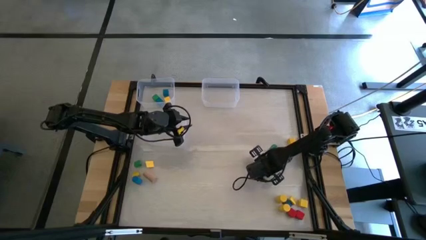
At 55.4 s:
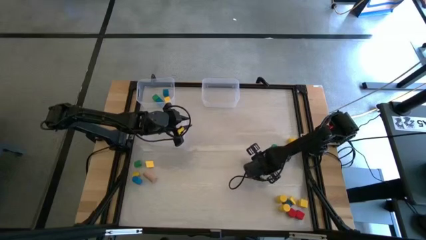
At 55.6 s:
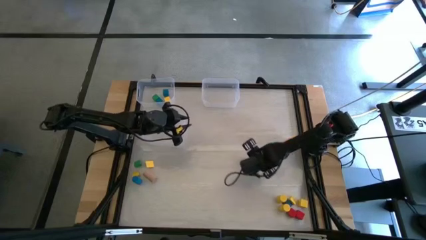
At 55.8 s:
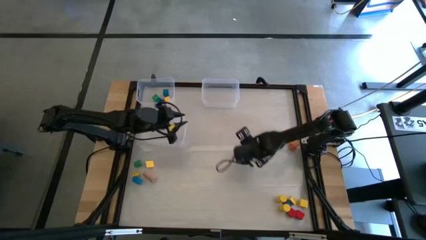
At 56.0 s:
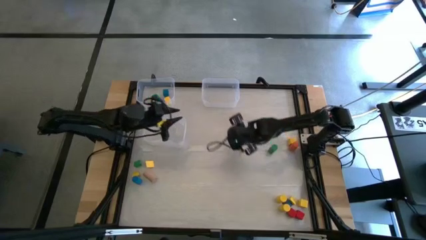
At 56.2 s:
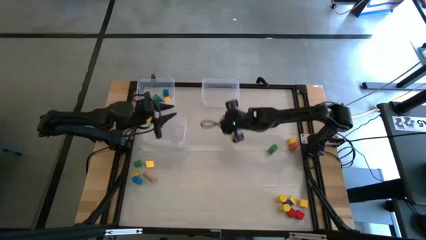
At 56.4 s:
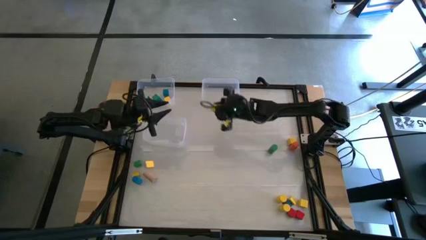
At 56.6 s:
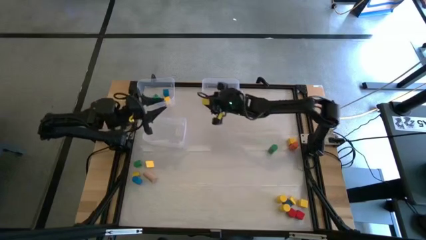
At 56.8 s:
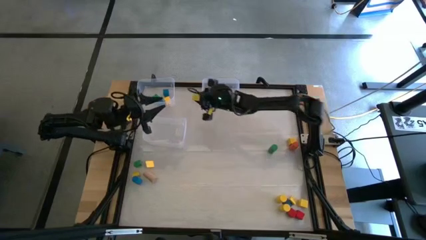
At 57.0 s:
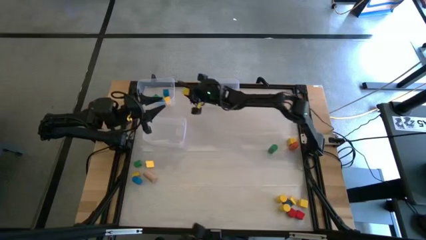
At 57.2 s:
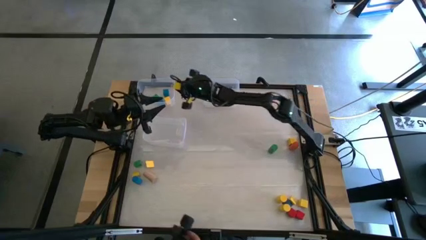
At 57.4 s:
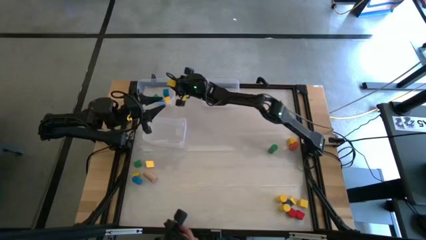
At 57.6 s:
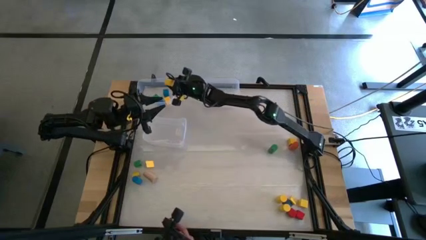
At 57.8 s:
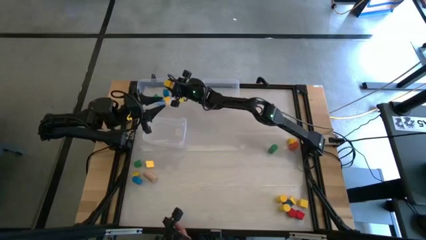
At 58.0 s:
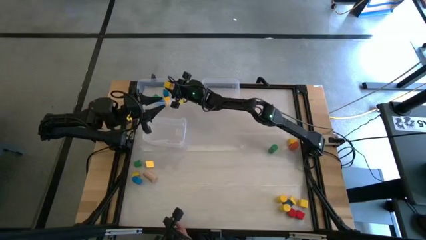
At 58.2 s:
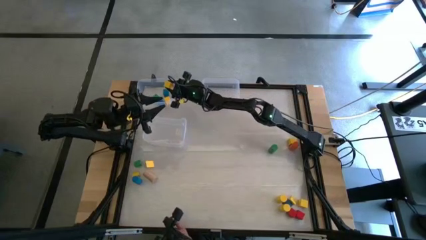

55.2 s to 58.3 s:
Task: Sort blocks by size
Put the yellow square game block into the top left transparent bin

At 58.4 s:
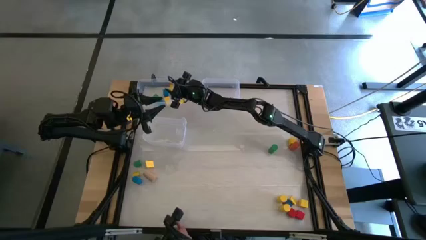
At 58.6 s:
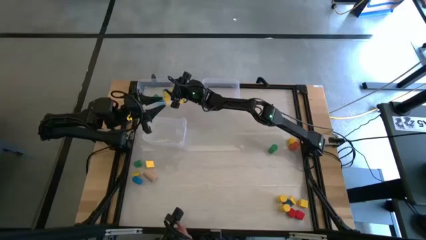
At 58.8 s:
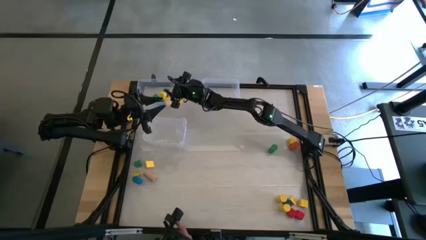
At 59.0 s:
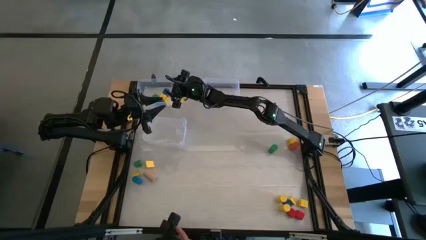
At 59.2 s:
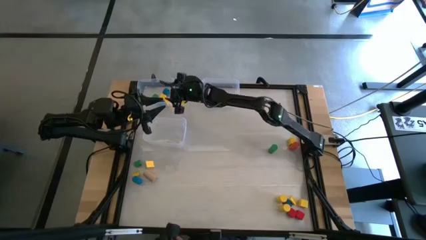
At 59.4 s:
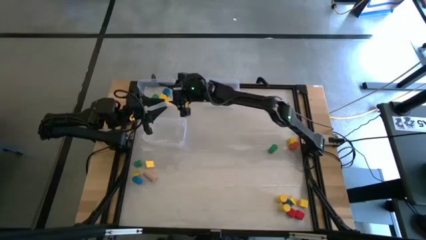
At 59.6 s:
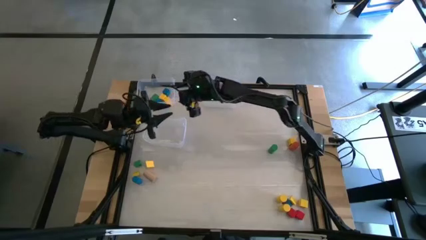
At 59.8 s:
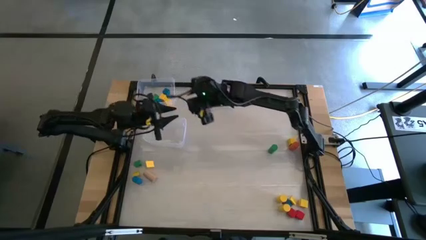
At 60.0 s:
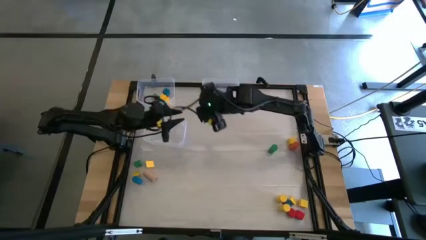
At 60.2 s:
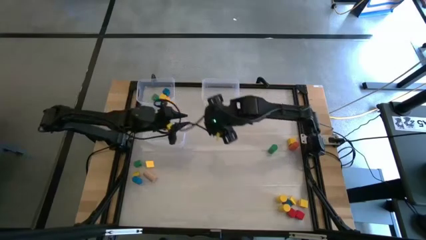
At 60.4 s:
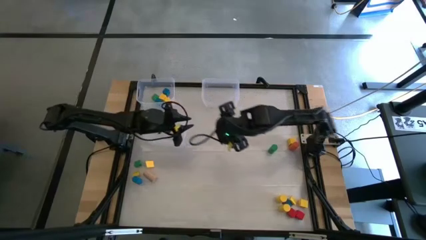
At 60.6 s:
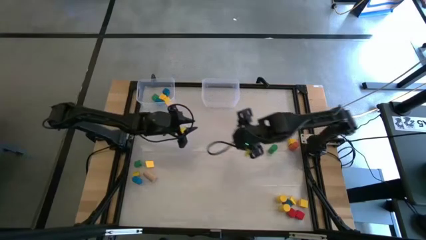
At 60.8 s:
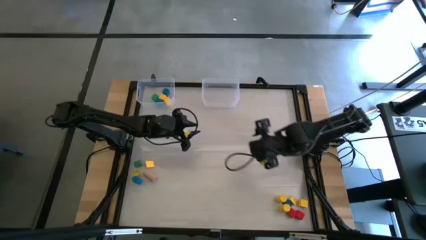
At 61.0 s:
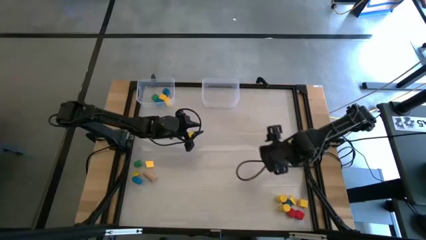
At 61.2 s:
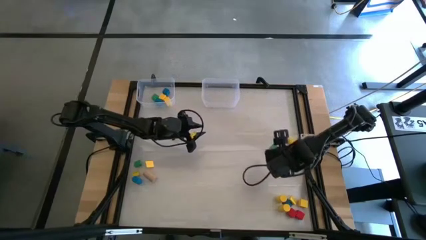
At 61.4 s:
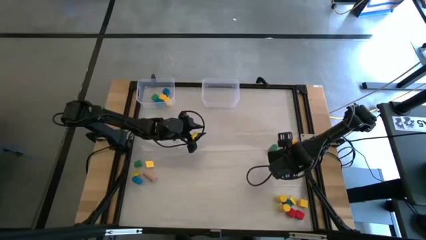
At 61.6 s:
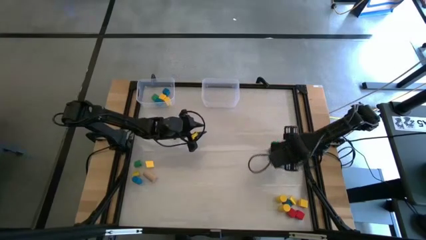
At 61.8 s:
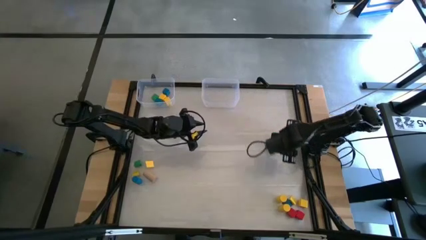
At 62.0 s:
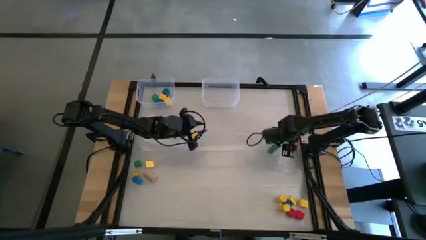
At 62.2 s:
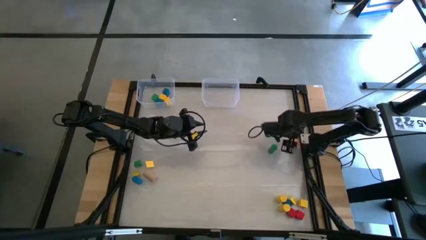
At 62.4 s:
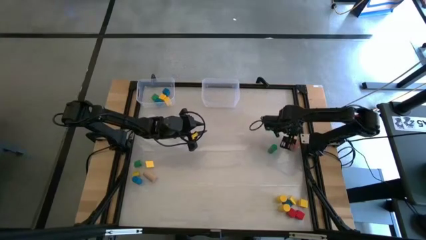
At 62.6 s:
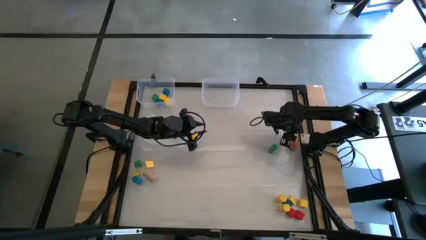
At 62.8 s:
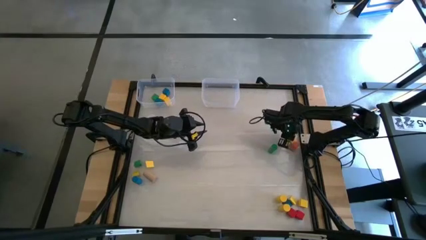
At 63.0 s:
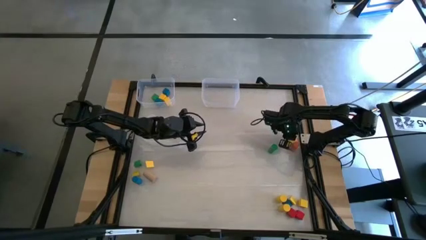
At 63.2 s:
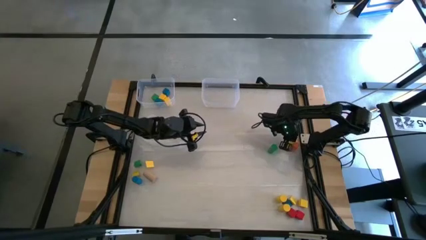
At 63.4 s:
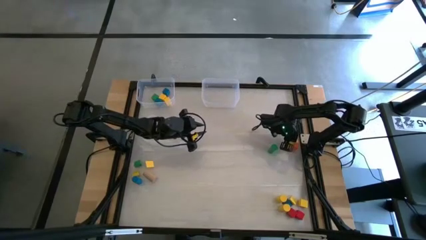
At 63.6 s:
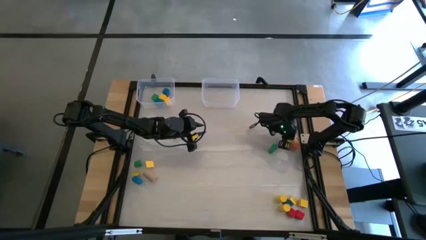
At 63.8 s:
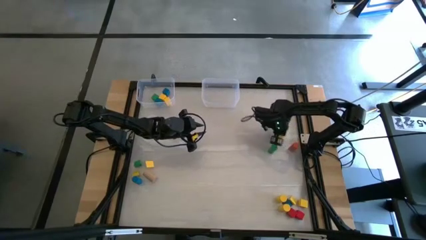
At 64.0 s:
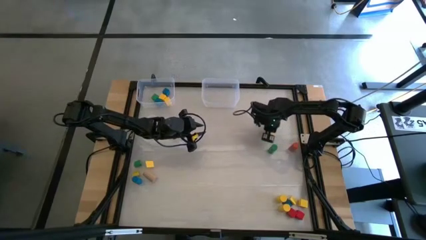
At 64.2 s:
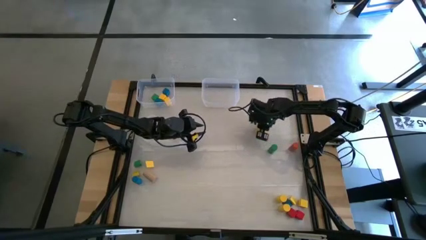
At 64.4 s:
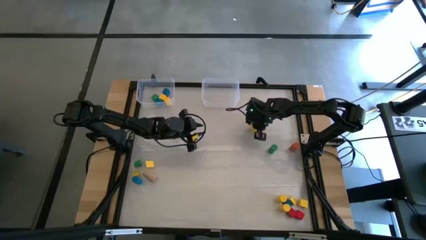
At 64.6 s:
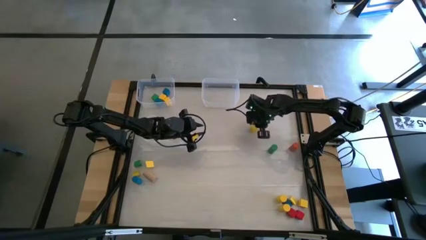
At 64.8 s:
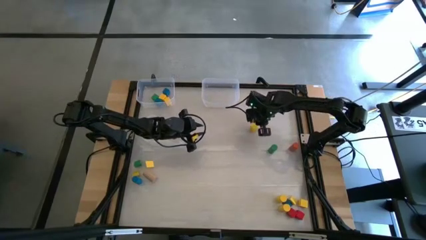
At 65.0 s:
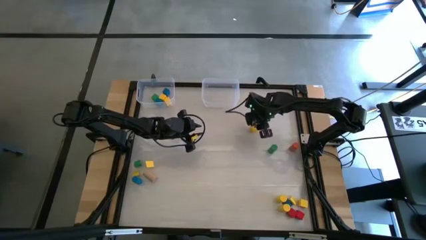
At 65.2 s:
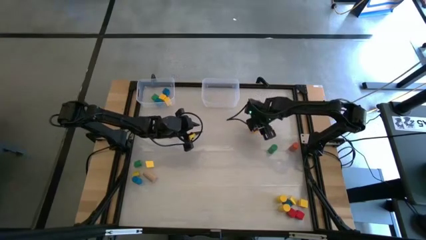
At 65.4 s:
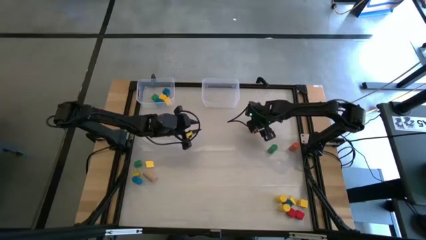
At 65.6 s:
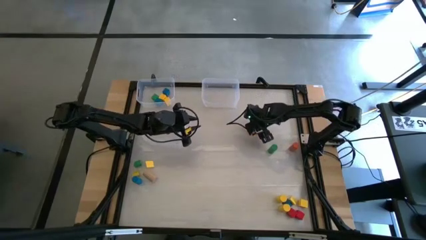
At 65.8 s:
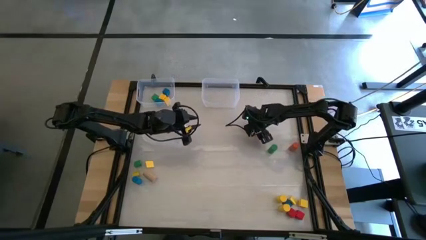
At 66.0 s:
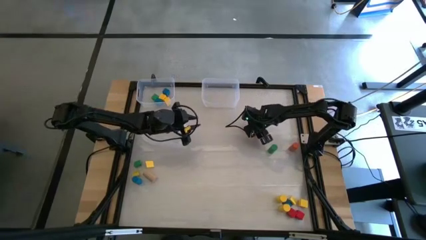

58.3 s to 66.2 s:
Put the yellow square game block into the top left transparent bin

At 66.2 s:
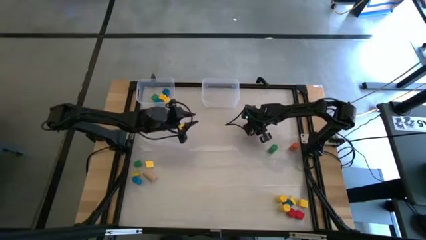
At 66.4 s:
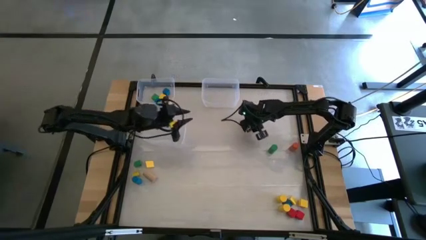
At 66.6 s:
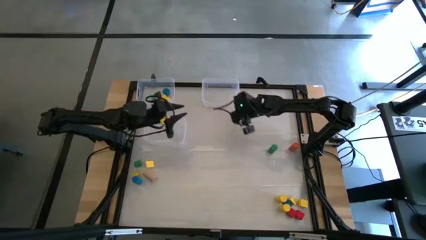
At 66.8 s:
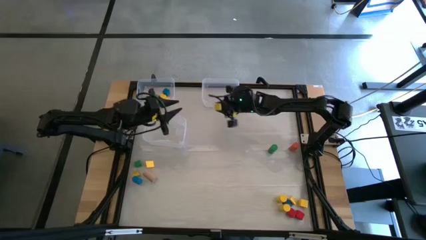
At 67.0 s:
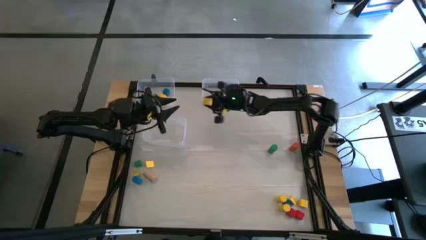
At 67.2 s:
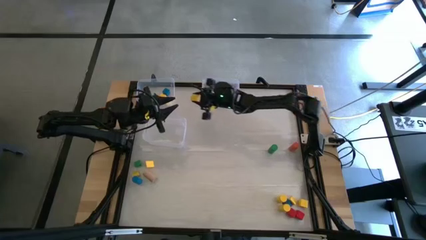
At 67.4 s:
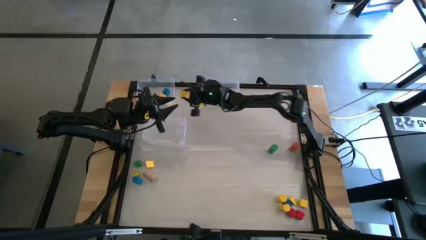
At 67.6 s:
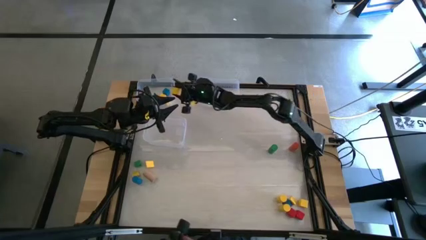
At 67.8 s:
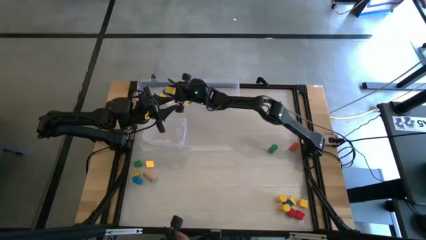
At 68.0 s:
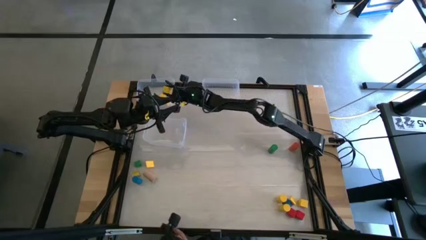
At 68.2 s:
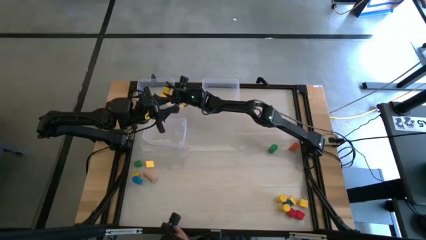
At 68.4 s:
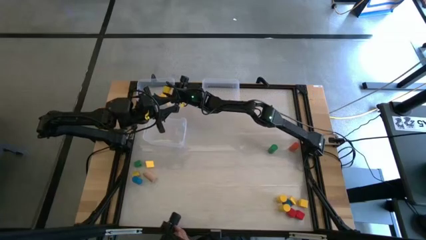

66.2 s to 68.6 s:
Put the yellow square game block into the top left transparent bin
